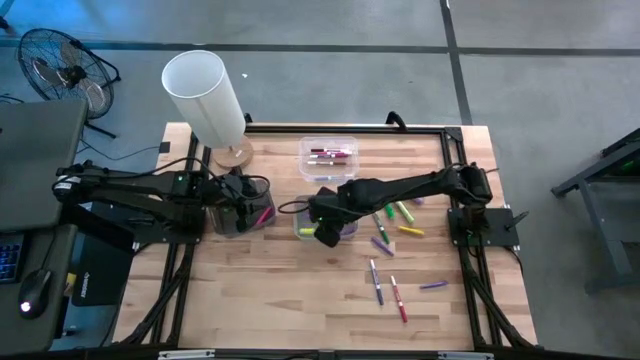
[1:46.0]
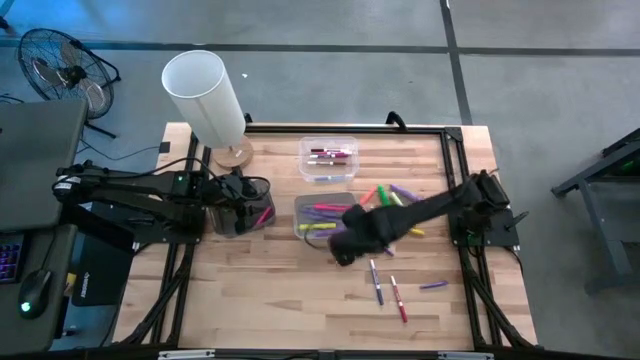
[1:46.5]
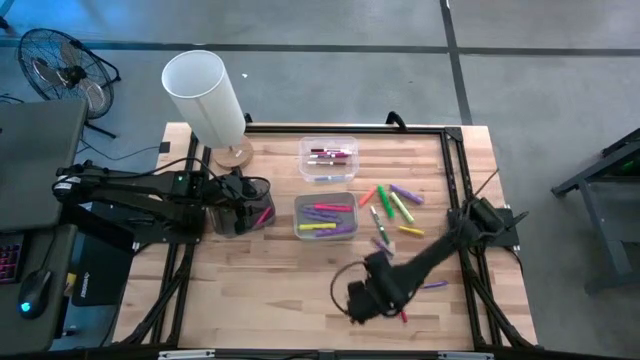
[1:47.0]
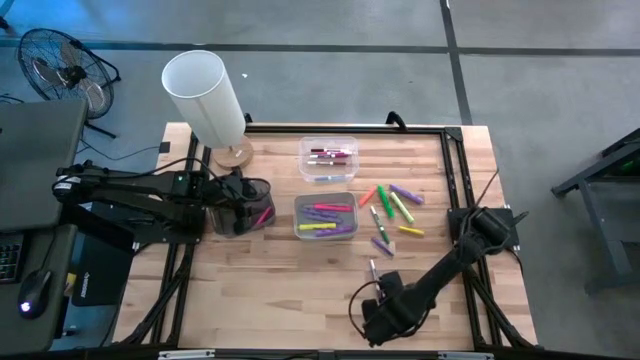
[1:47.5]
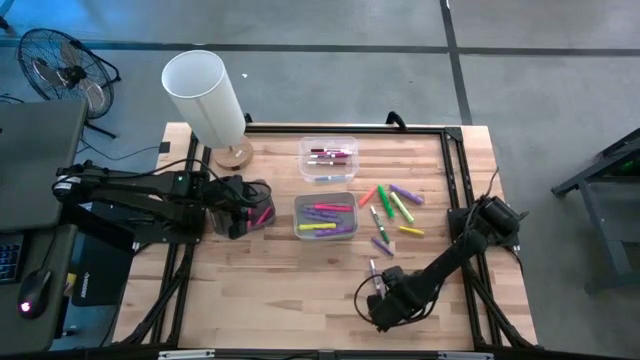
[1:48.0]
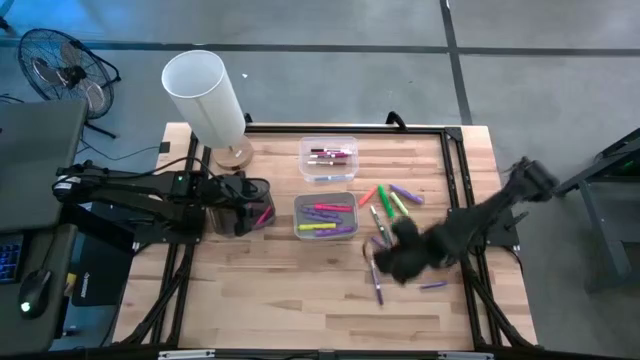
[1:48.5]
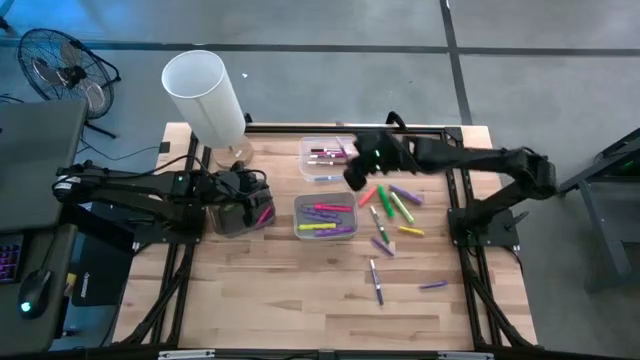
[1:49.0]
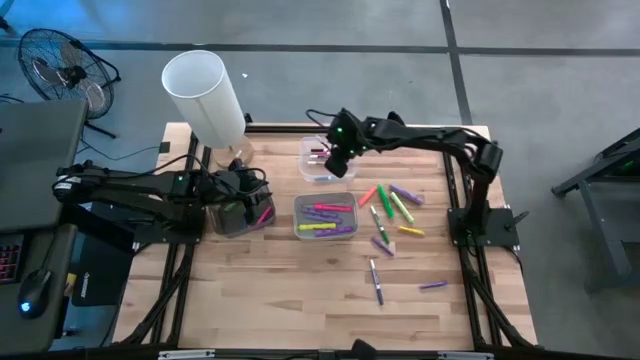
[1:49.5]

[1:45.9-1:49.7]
Task: Pick & Place Markers
Put the red marker pen into the transparent bin

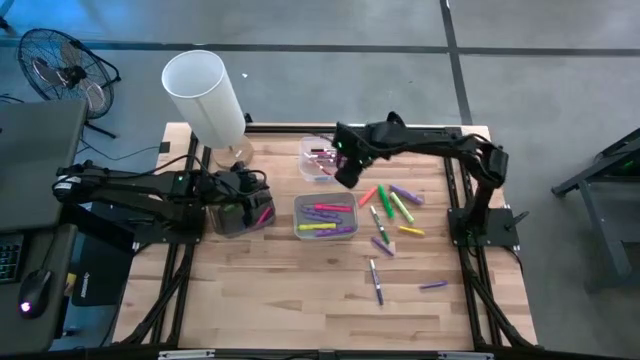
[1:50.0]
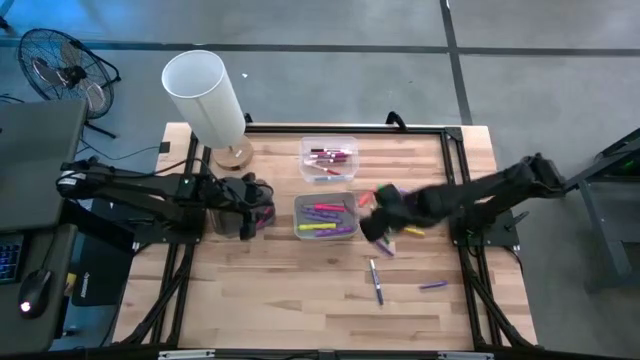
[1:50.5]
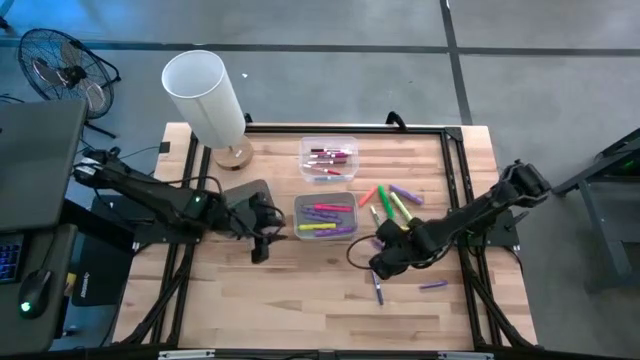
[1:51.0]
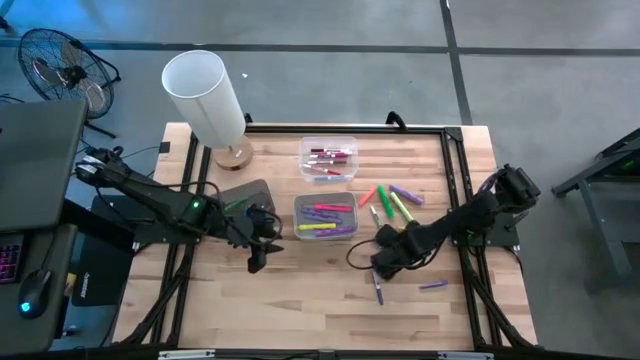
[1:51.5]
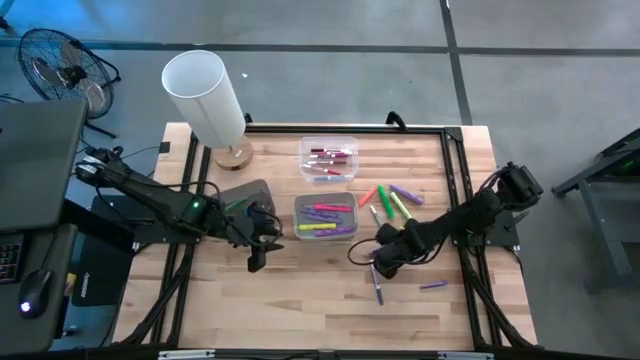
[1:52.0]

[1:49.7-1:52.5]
Put the violet pen into the black bin

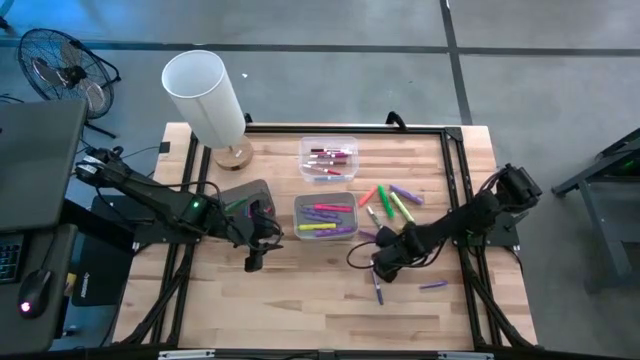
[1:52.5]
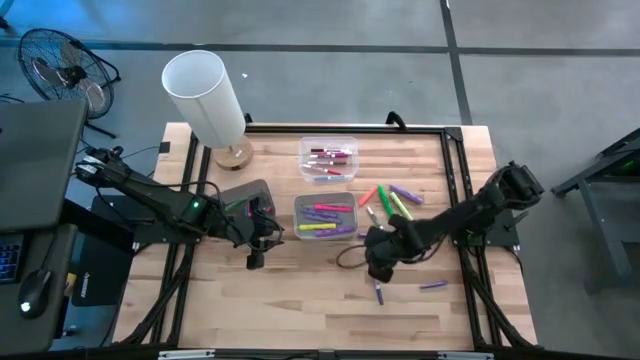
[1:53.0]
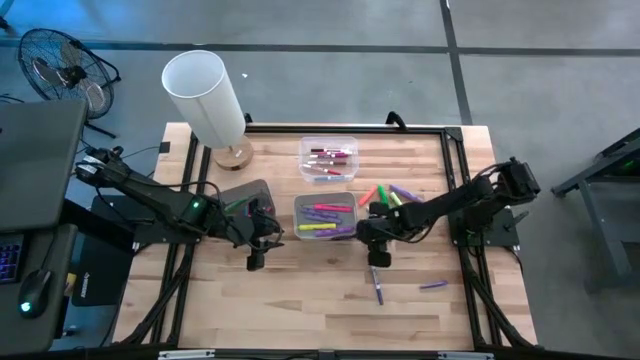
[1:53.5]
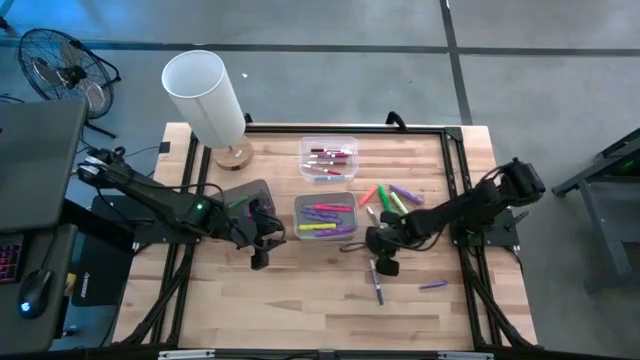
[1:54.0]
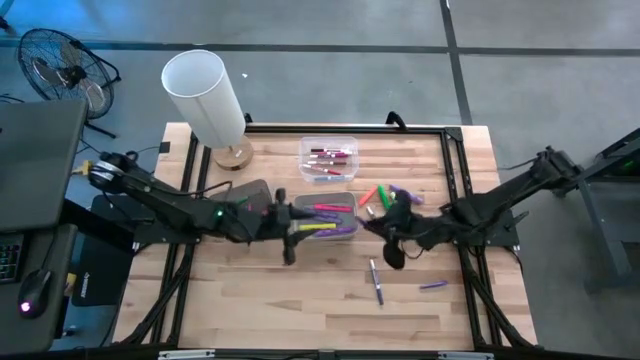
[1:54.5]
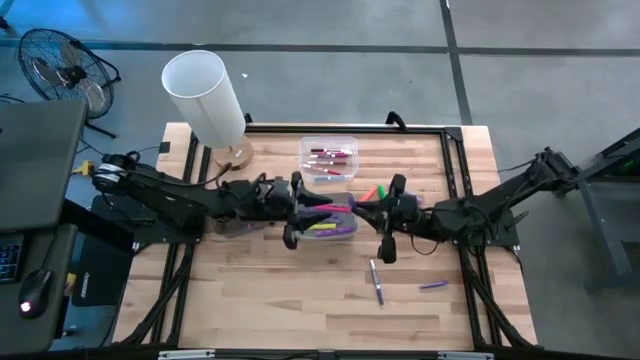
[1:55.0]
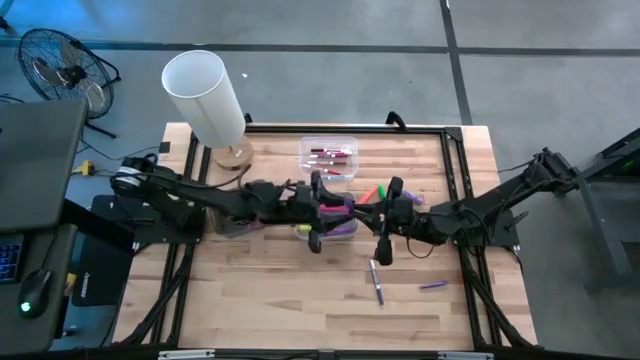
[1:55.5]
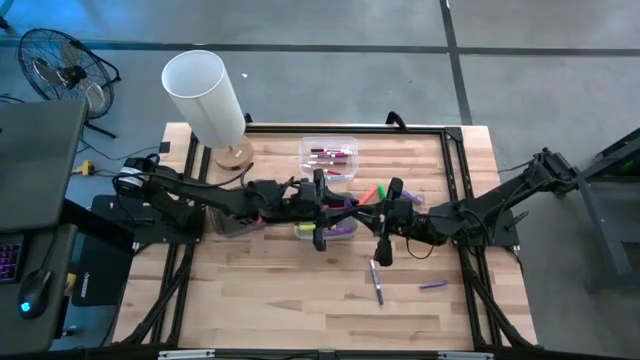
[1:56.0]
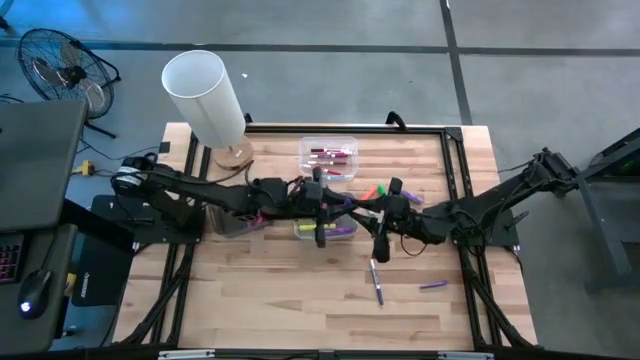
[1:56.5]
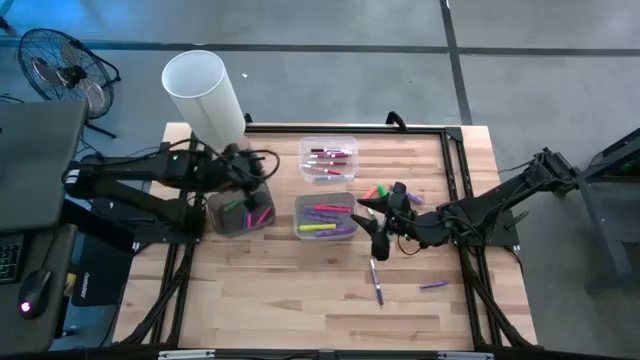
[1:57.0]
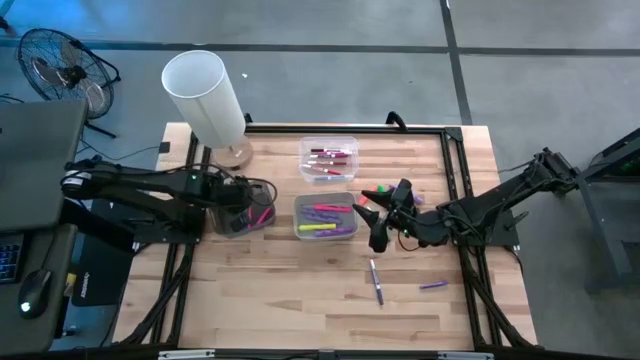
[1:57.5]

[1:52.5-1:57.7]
Put the violet pen into the black bin

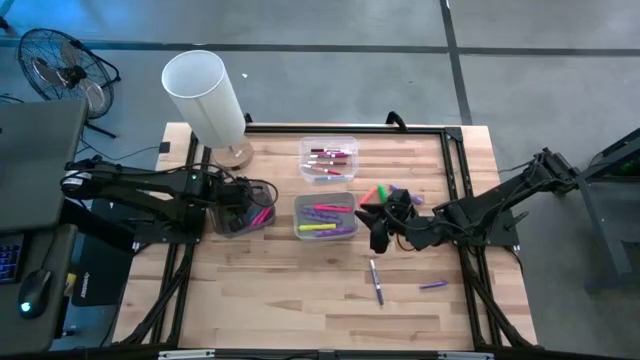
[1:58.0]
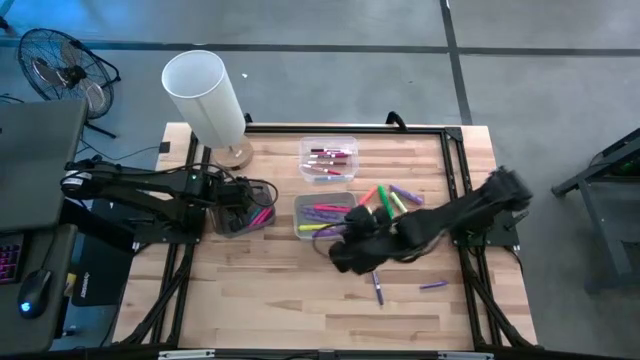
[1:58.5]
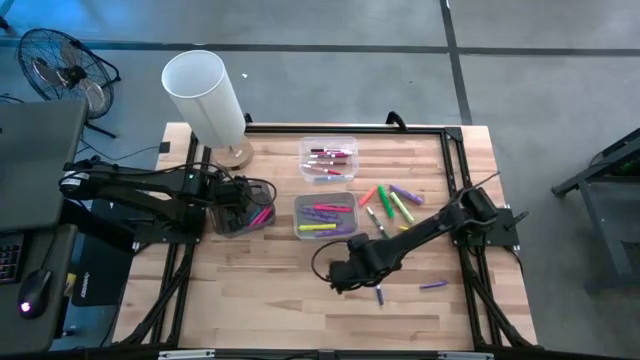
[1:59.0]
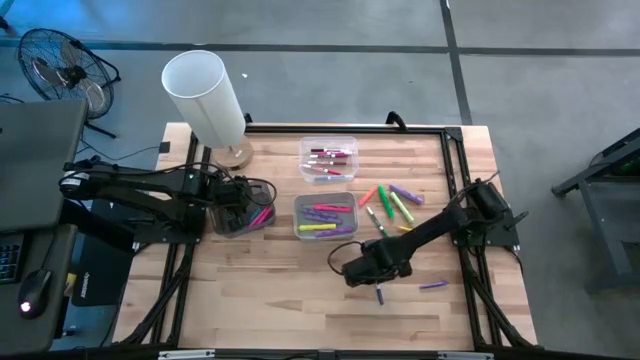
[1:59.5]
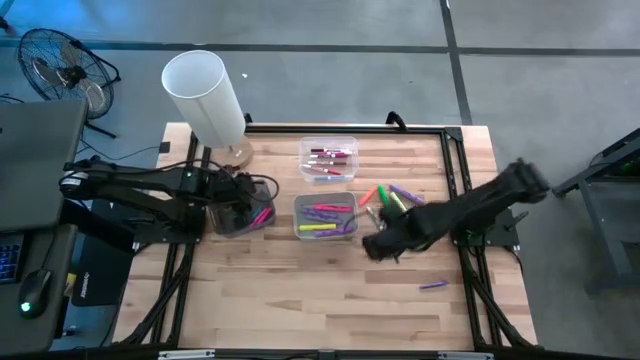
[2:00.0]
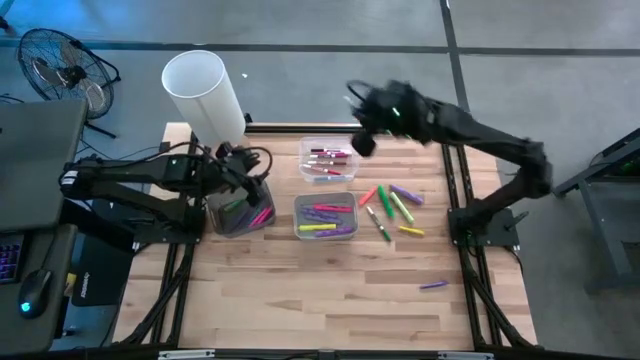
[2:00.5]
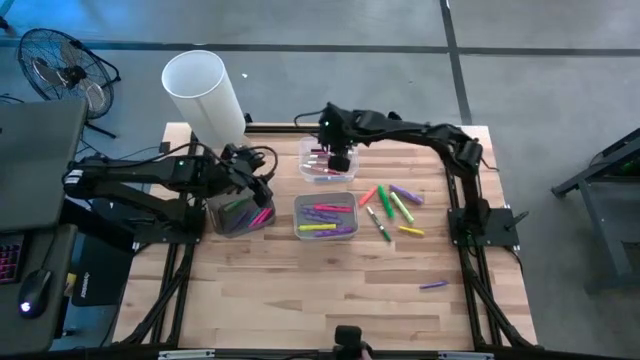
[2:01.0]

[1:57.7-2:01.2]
Put the violet marker pen into the transparent bin

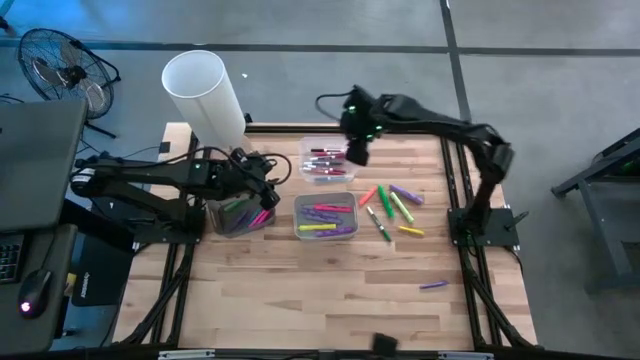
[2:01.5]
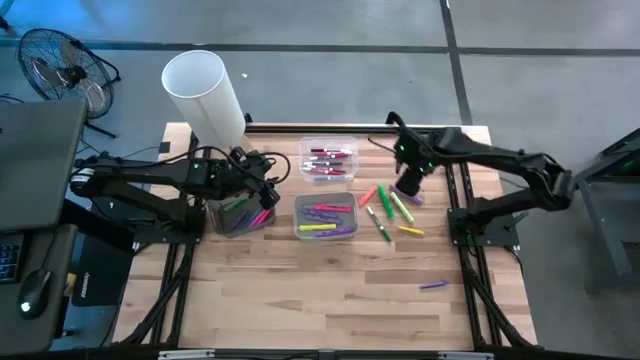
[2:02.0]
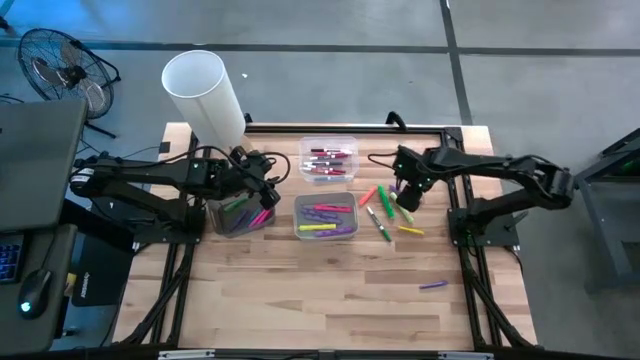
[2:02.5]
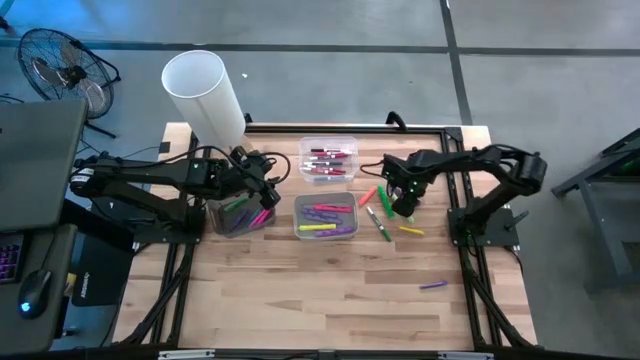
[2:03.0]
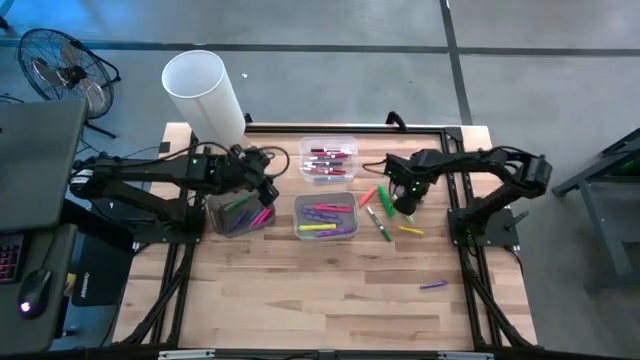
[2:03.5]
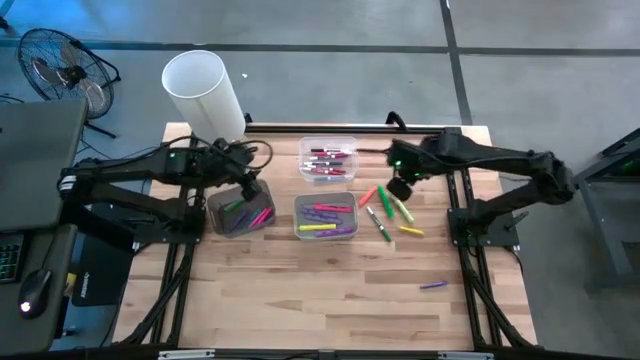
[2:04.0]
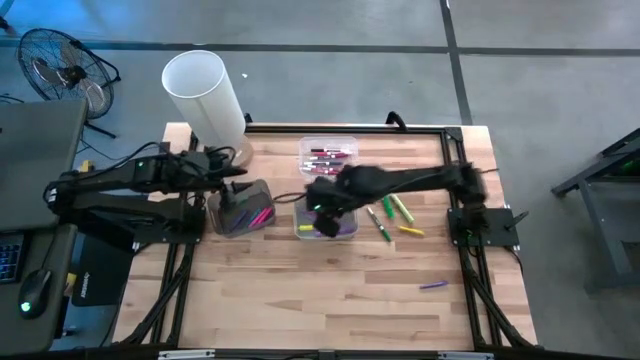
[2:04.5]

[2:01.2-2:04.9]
Put the purple highlighter pen into the white bin

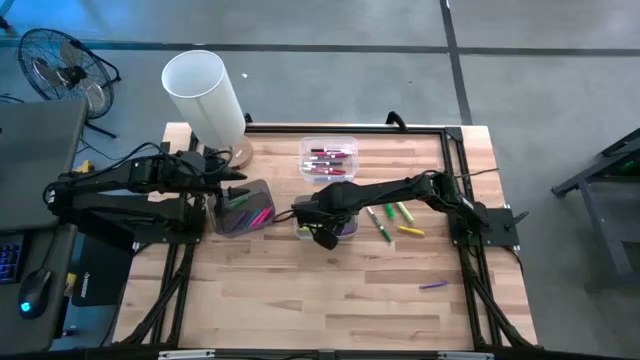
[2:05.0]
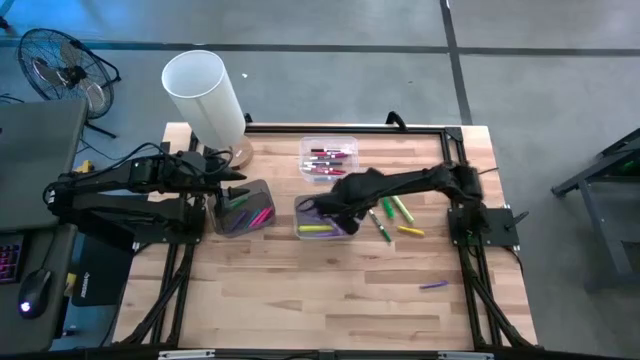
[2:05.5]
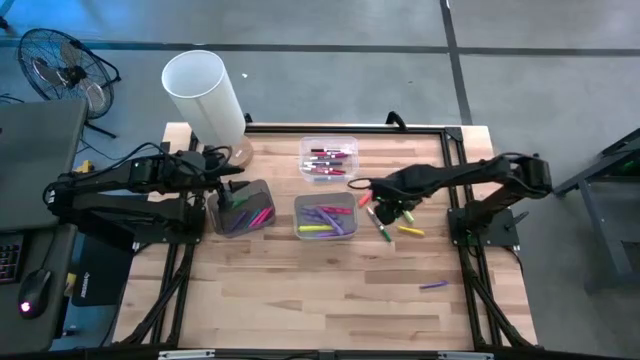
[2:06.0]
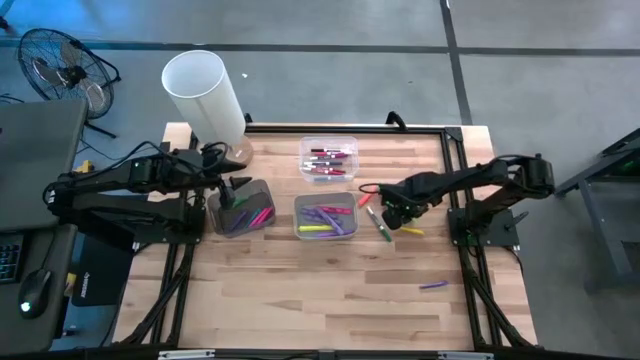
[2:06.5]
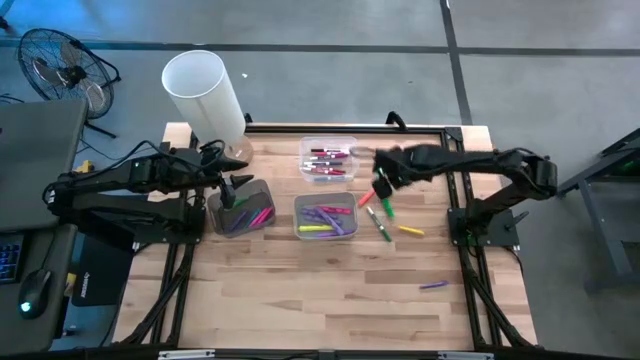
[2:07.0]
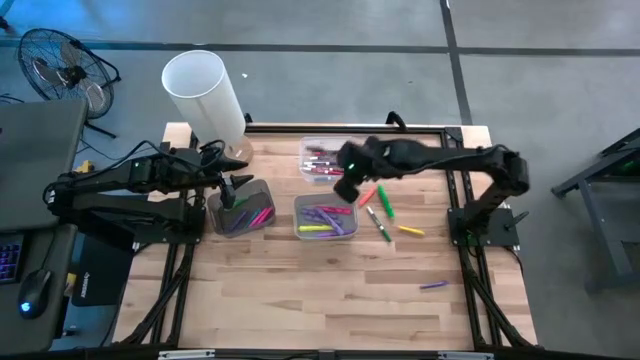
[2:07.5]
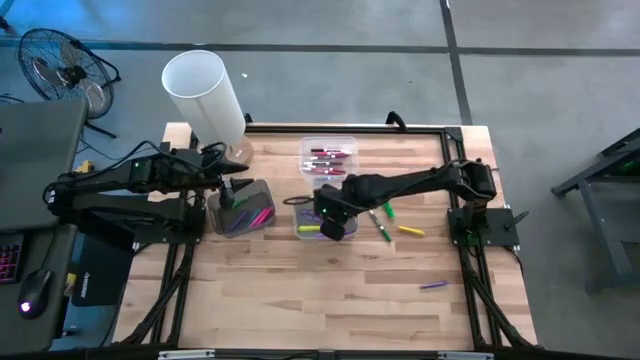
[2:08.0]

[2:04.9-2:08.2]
Put the light green highlighter pen into the white bin
